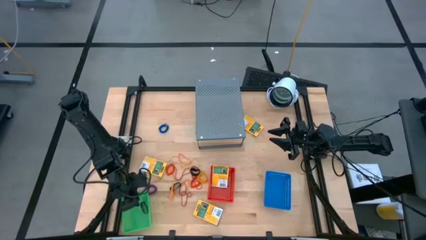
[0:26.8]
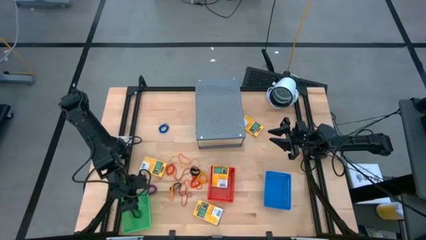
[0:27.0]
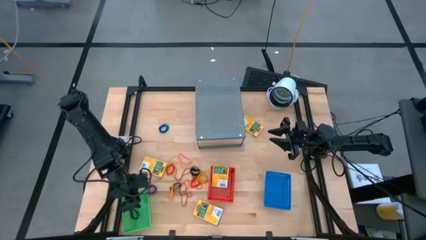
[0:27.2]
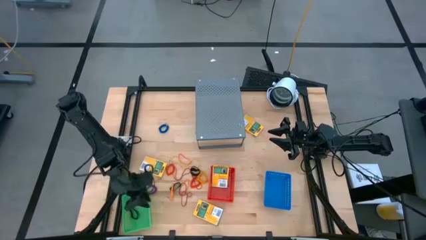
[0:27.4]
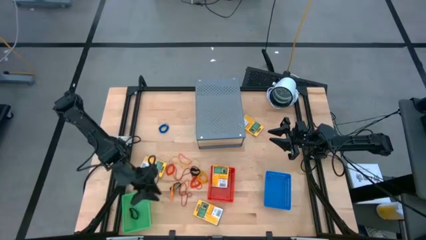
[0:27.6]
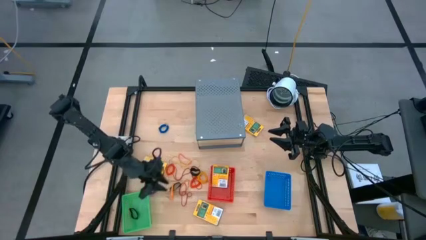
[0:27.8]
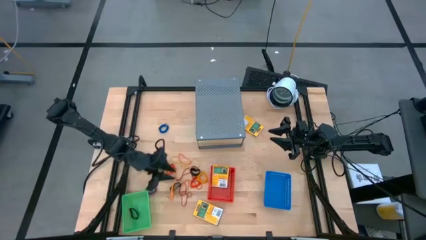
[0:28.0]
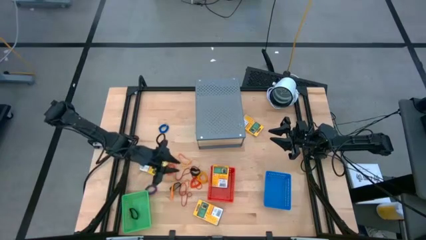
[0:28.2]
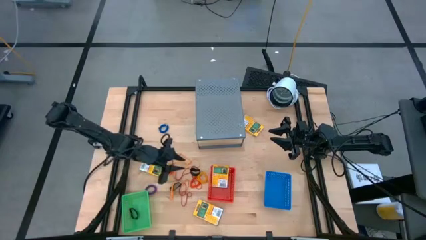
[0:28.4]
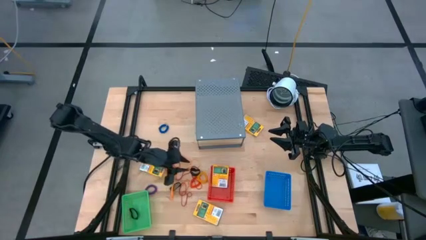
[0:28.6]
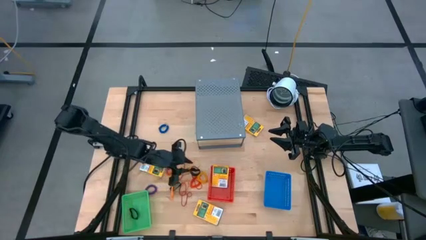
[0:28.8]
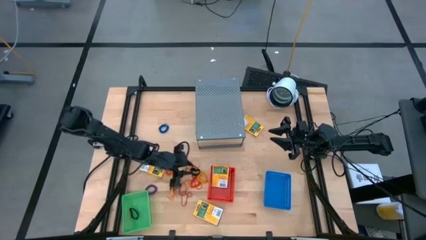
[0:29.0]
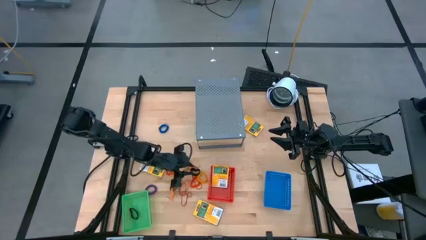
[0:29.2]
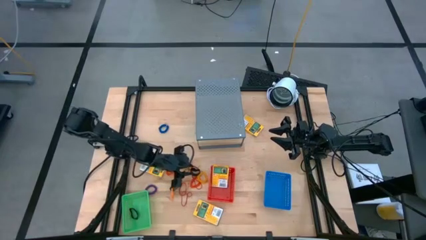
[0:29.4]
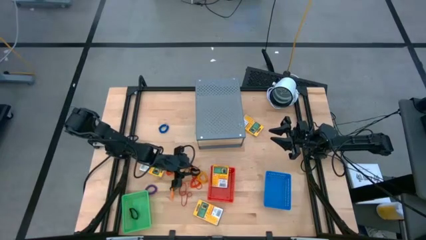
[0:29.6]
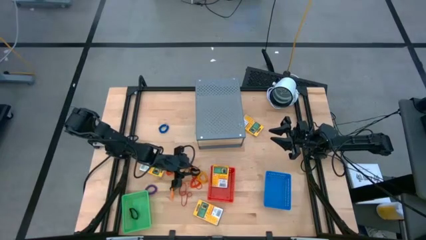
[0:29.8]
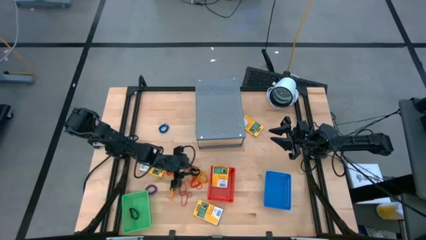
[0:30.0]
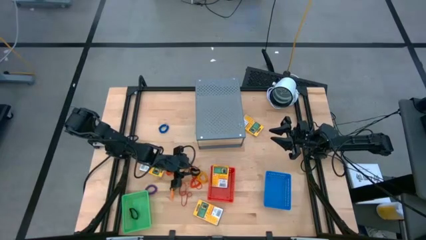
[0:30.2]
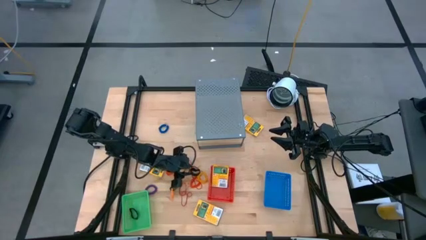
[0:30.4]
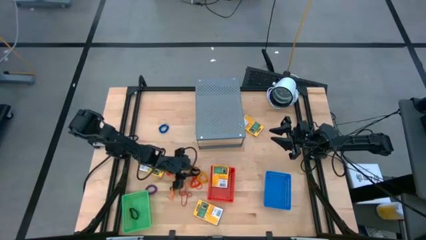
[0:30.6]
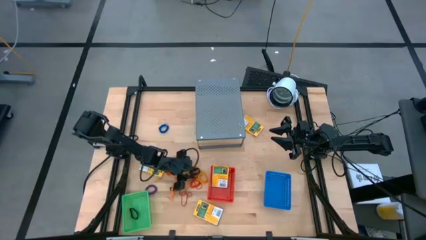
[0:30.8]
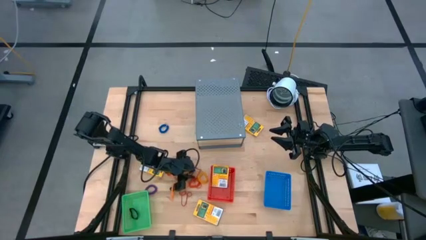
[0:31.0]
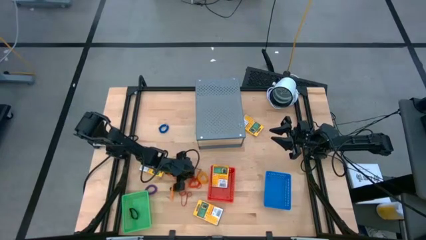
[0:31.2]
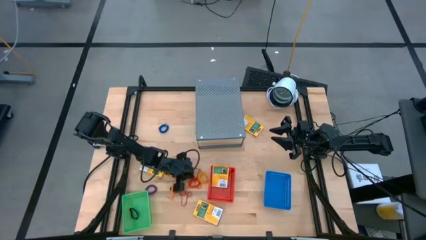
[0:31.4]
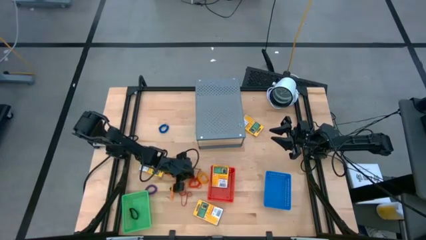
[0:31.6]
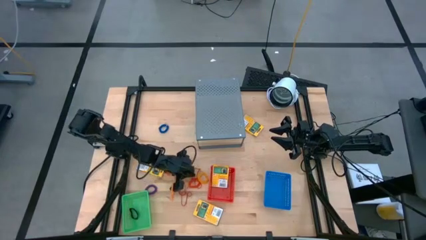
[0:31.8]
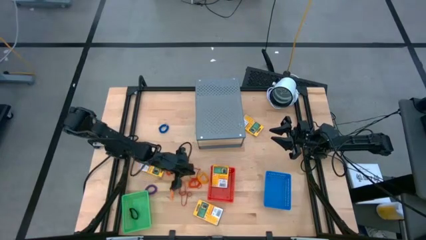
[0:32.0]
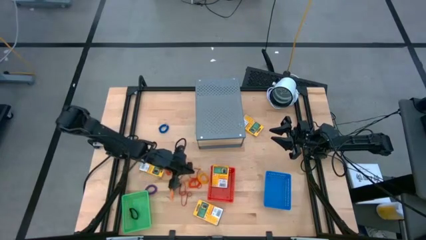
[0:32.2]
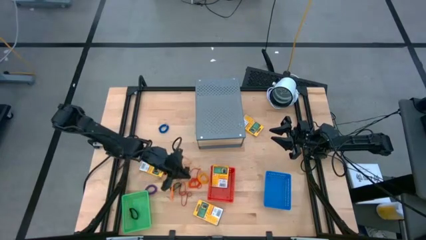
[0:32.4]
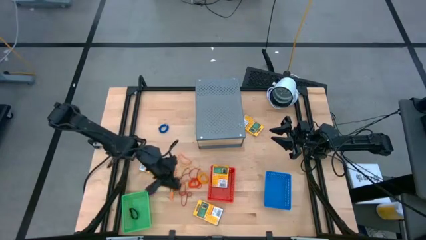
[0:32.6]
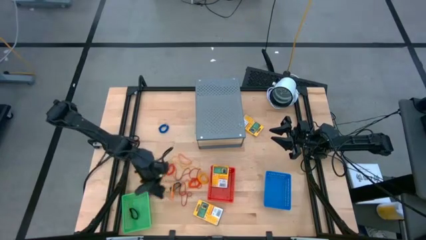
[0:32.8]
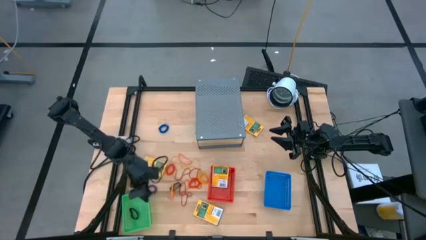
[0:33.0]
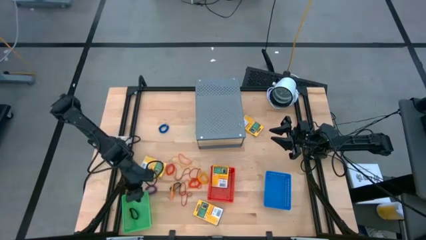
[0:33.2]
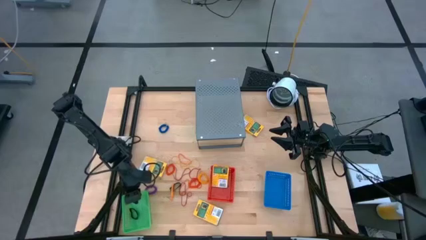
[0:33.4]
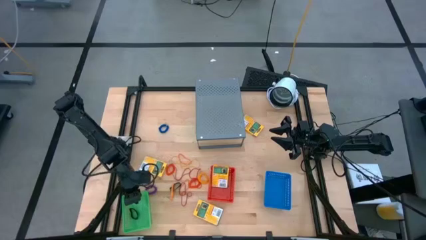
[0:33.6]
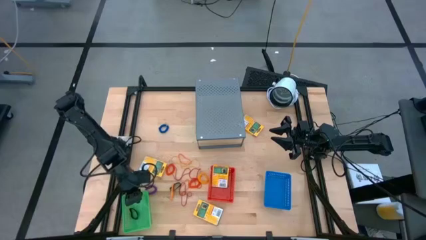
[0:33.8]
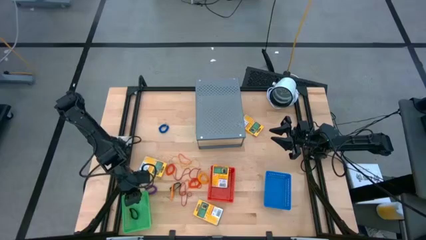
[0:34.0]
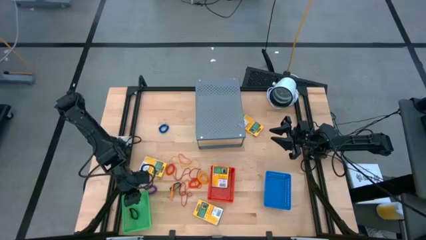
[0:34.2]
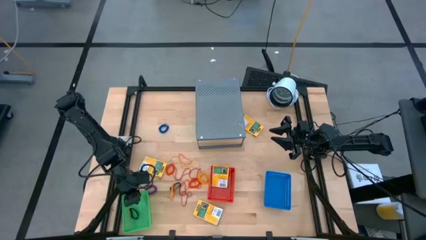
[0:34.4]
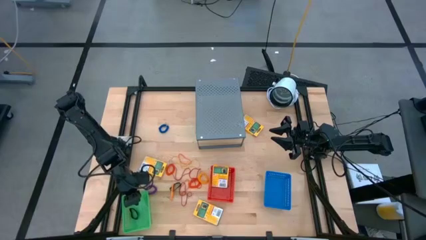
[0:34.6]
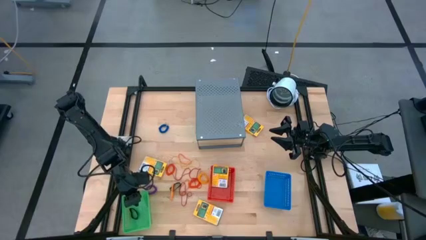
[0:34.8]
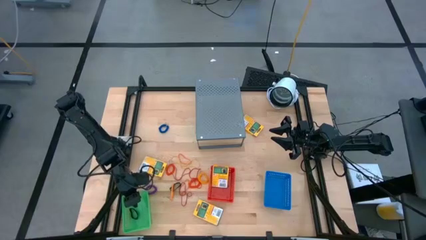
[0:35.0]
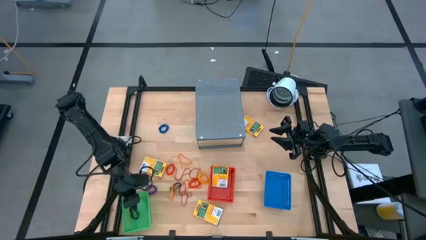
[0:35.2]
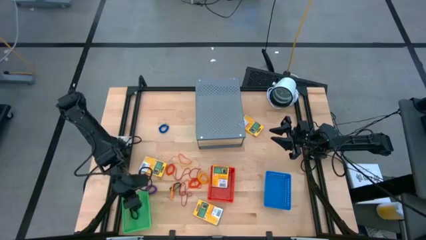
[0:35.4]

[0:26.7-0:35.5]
Task: Pick & Place Office Desk Supplies
Put the black rubber band into the green bin

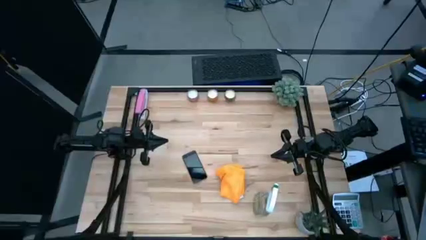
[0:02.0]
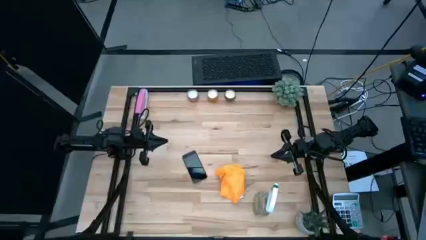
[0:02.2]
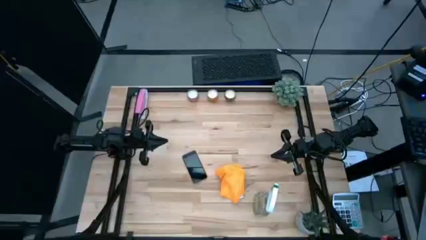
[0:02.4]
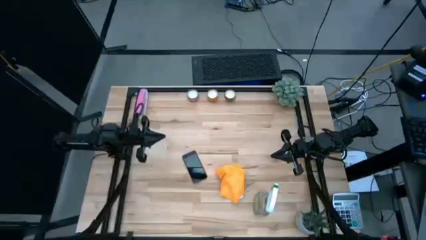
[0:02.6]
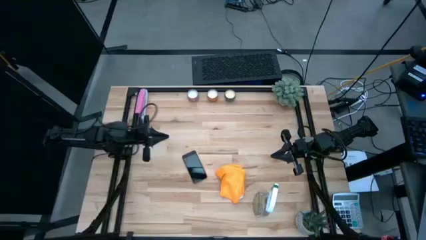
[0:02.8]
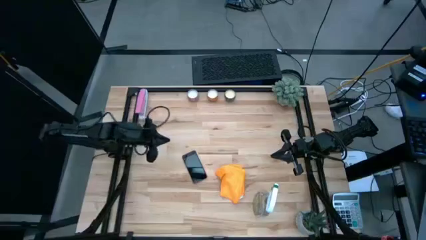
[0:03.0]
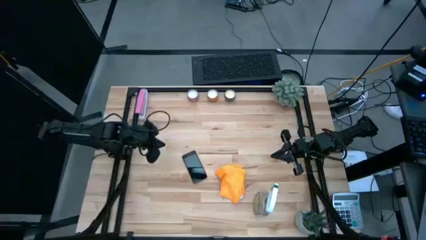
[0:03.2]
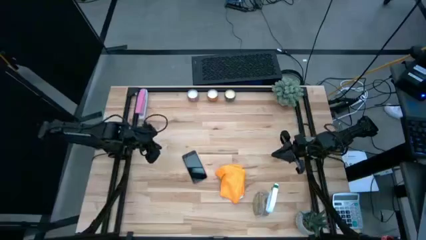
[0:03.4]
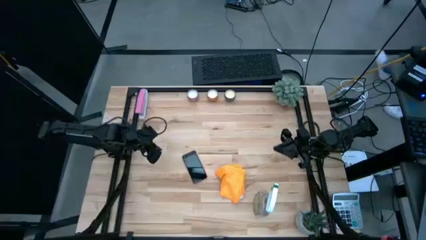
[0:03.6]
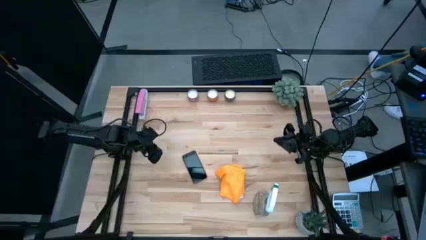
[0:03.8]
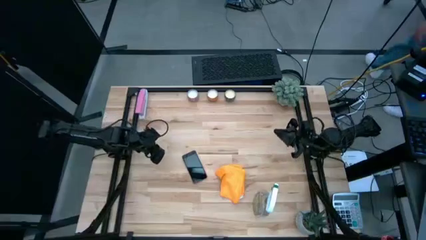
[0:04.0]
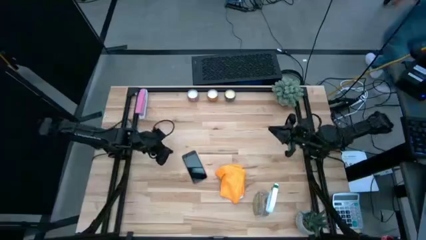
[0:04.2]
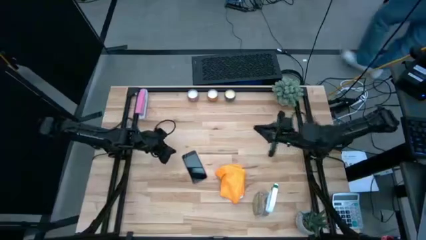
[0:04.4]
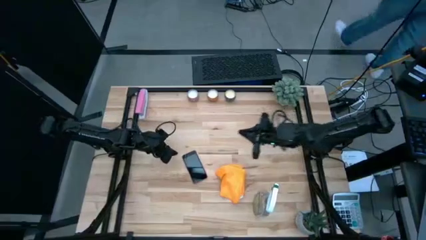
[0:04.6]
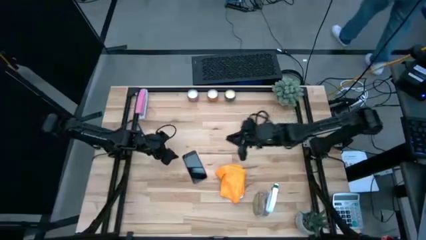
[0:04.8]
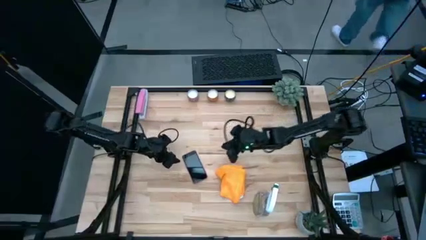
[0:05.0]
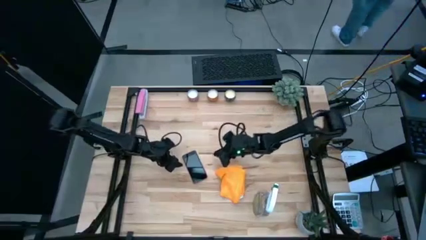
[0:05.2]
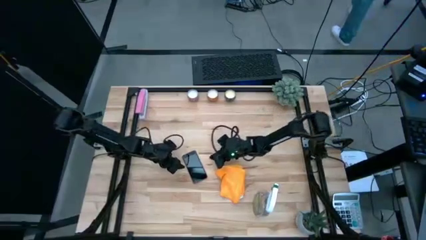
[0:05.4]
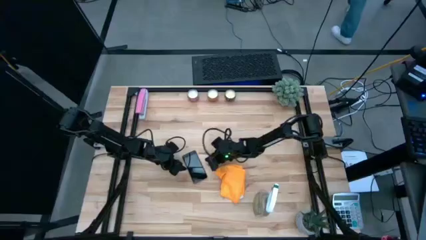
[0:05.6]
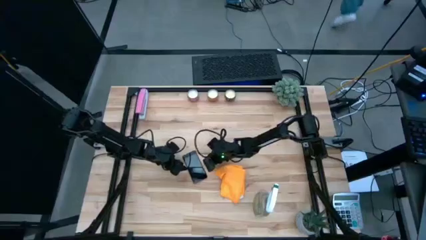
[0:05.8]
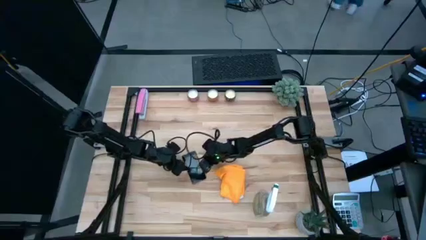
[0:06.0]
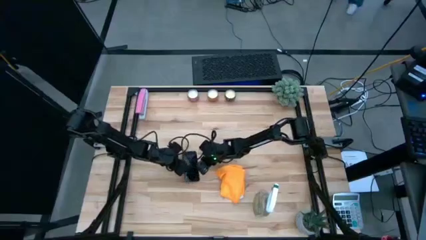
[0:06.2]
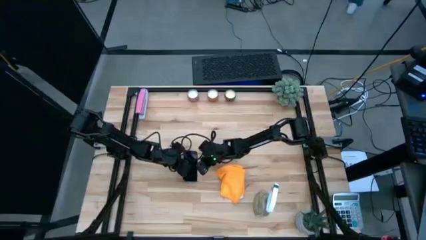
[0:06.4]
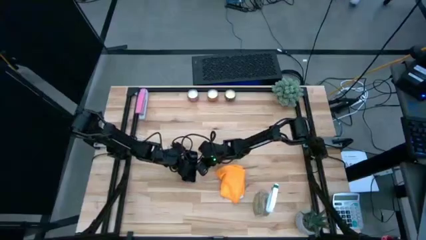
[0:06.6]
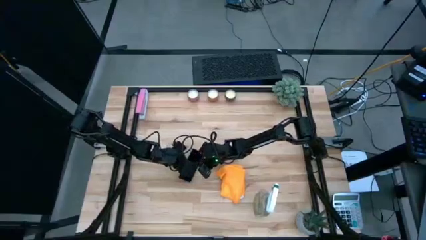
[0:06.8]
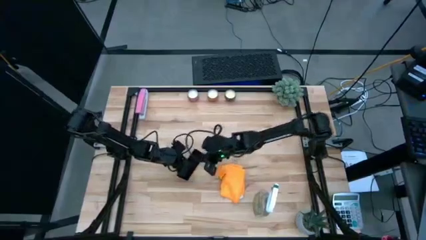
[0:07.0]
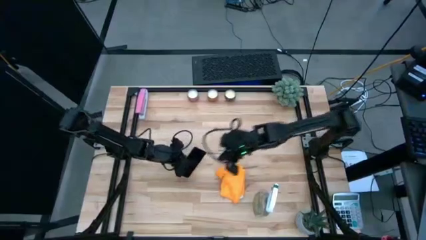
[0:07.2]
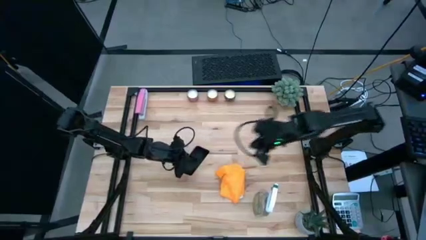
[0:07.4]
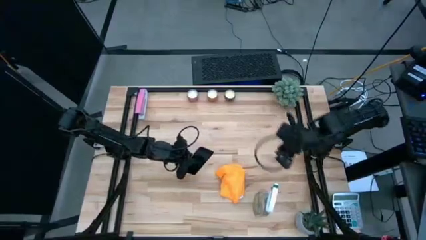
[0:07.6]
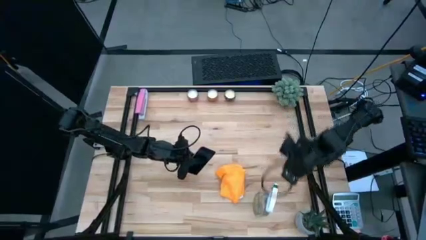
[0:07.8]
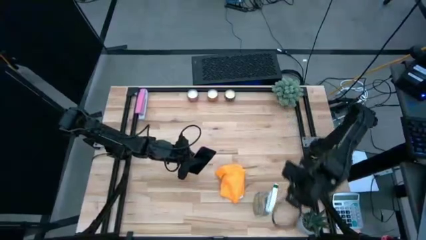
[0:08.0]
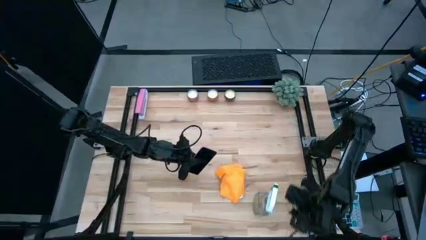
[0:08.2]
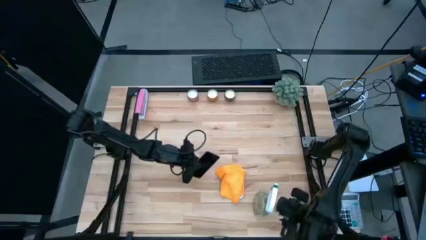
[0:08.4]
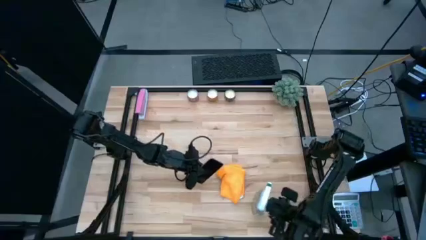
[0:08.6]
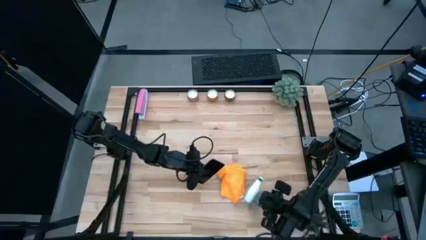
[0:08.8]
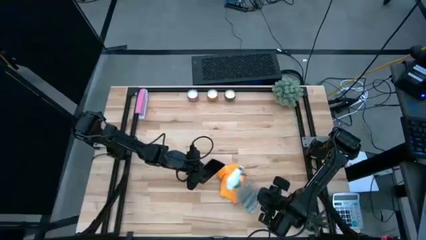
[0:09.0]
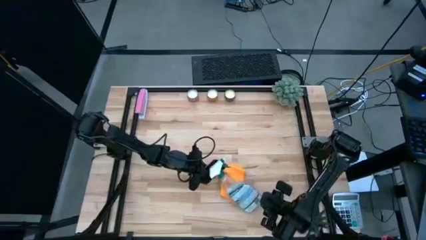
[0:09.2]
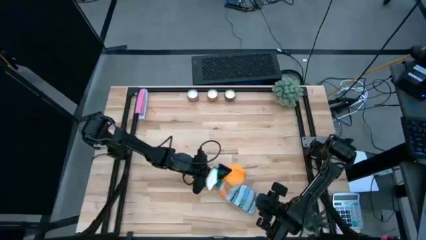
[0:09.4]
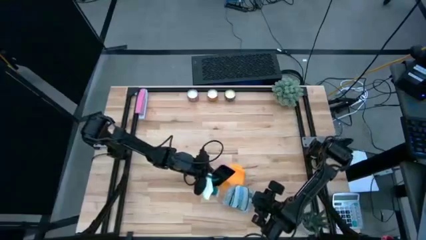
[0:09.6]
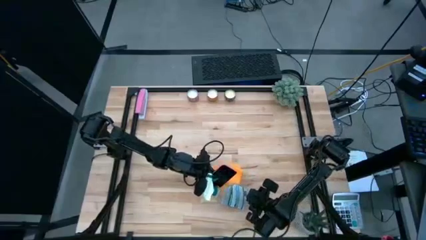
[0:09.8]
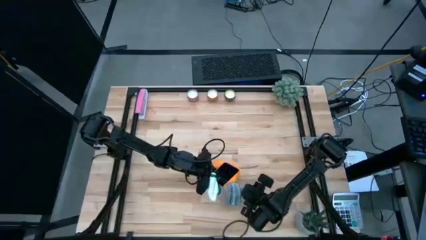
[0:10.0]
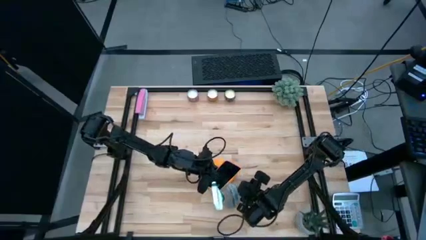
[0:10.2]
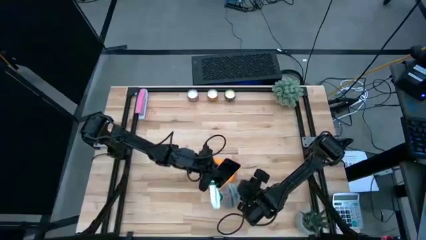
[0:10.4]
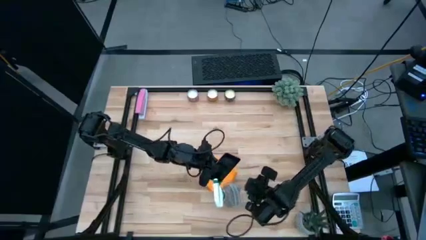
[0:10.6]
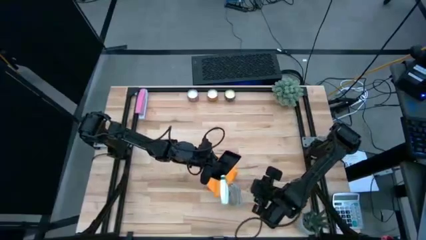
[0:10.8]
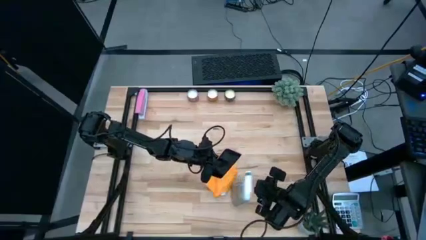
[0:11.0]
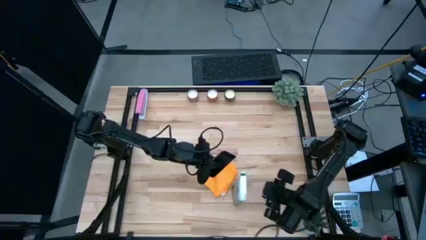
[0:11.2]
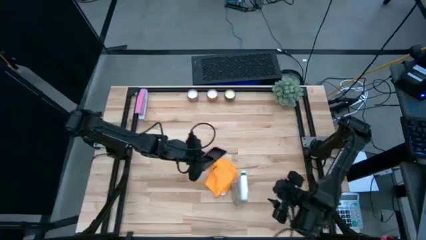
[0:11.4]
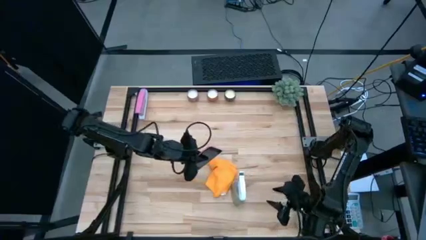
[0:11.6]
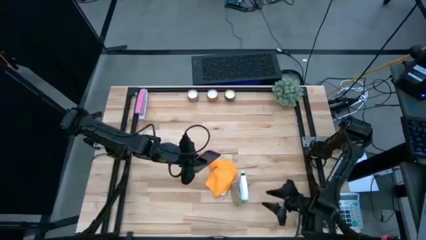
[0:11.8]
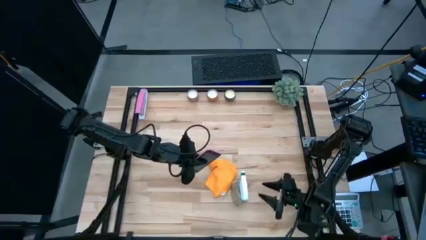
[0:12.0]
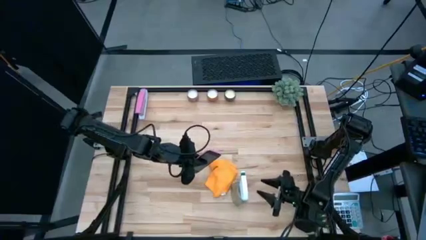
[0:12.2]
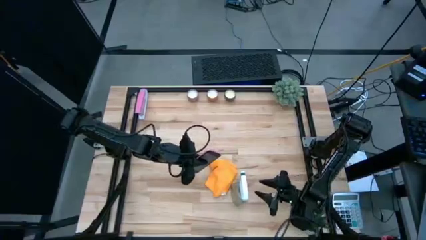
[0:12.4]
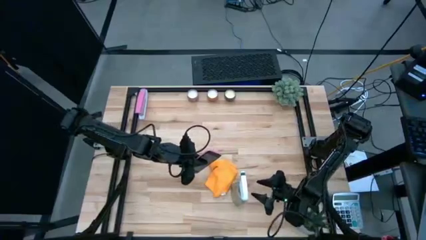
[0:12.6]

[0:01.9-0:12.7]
Task: Apply microfiber cloth
Spray the front side of the pink cellphone using the spray bottle
